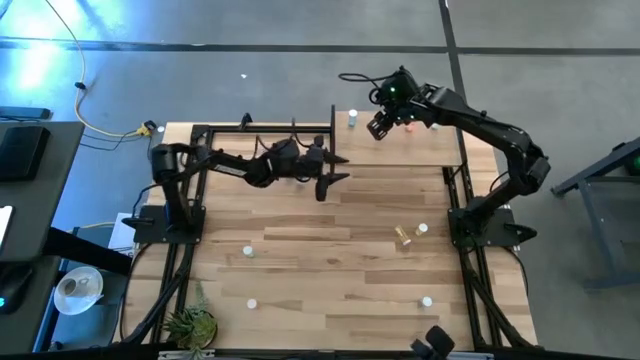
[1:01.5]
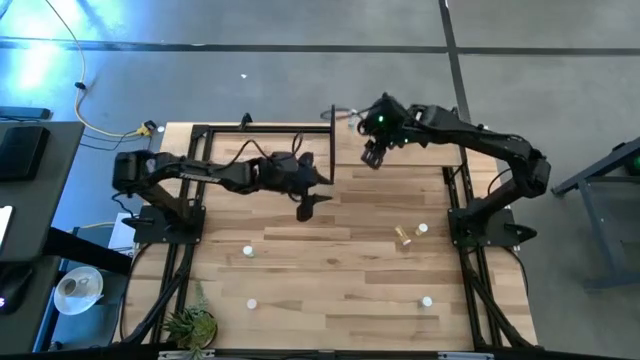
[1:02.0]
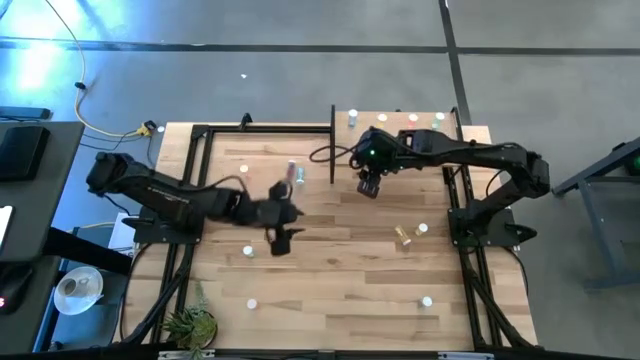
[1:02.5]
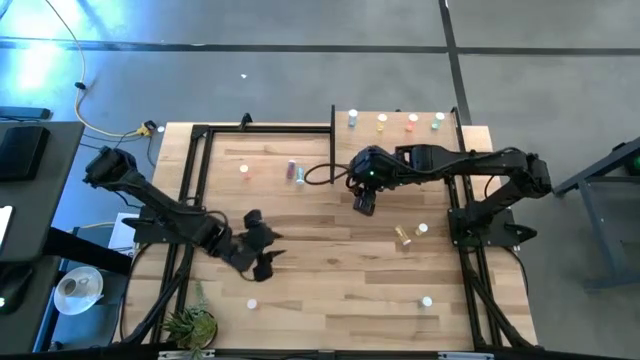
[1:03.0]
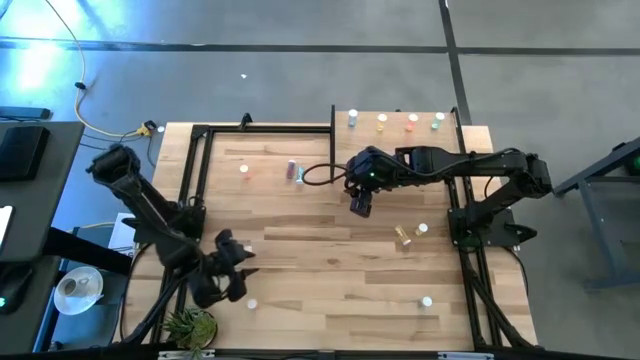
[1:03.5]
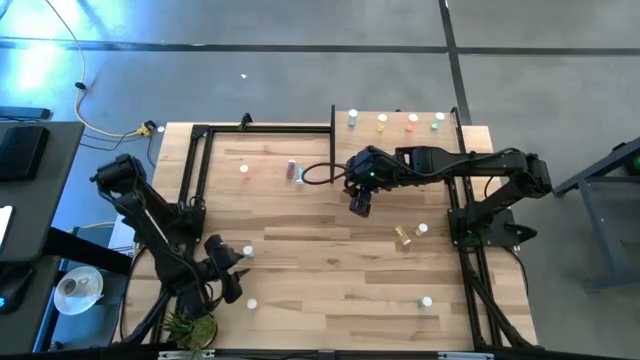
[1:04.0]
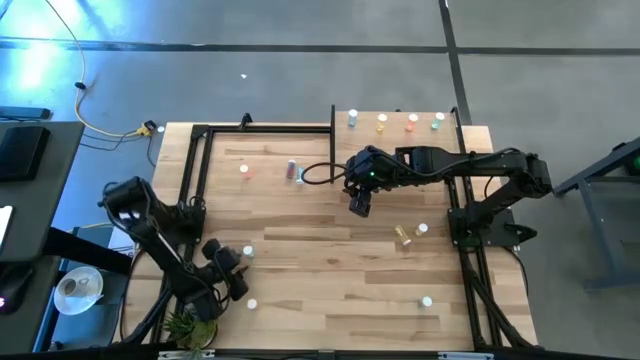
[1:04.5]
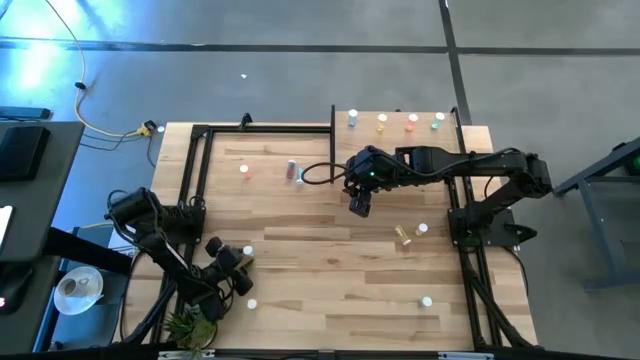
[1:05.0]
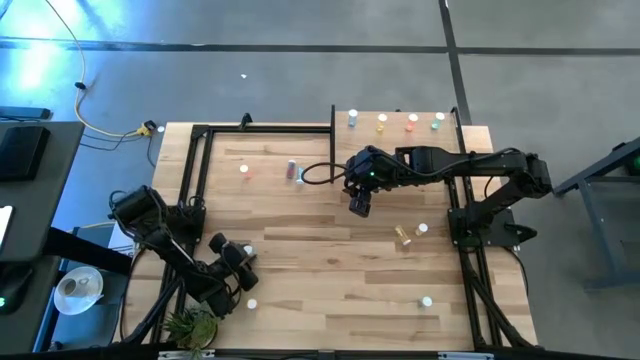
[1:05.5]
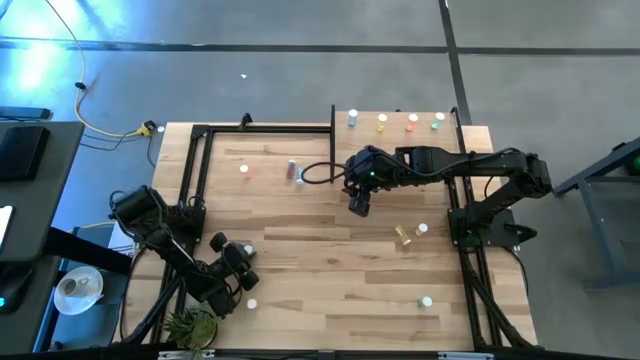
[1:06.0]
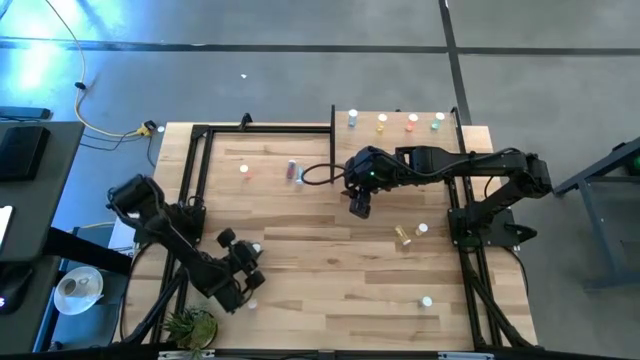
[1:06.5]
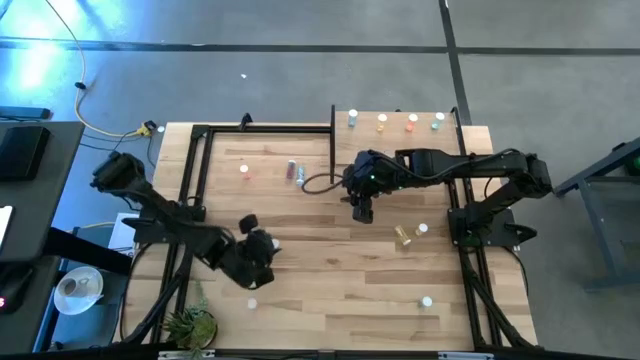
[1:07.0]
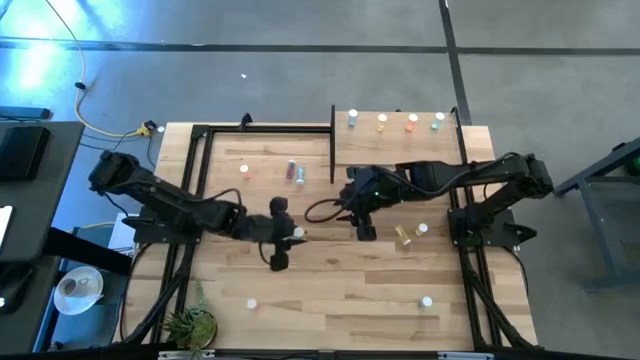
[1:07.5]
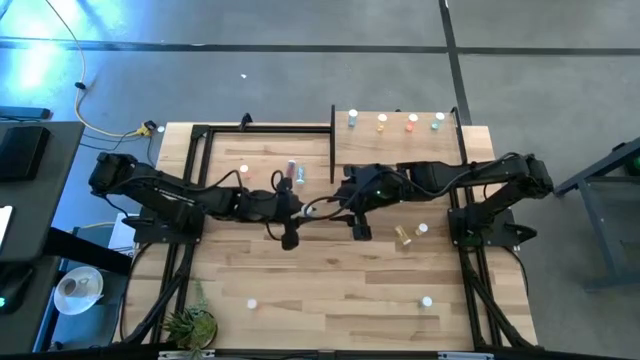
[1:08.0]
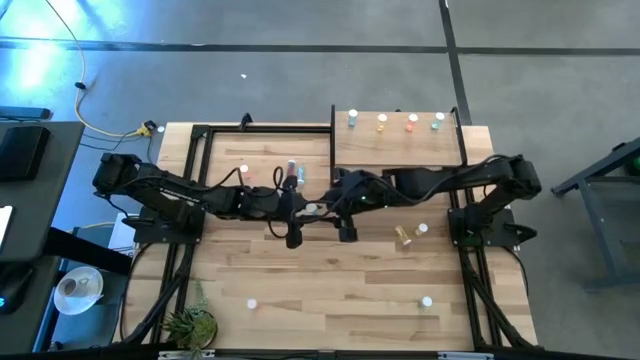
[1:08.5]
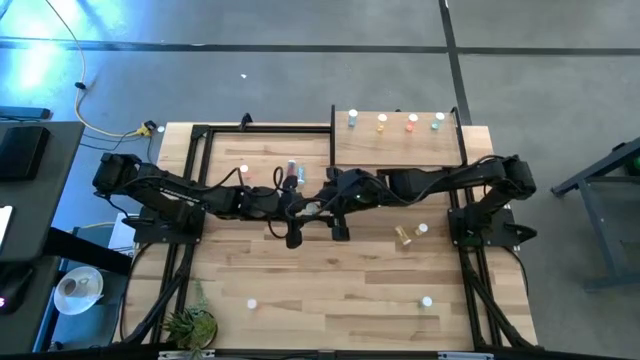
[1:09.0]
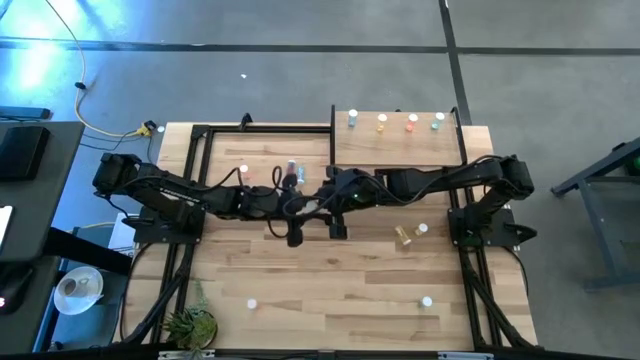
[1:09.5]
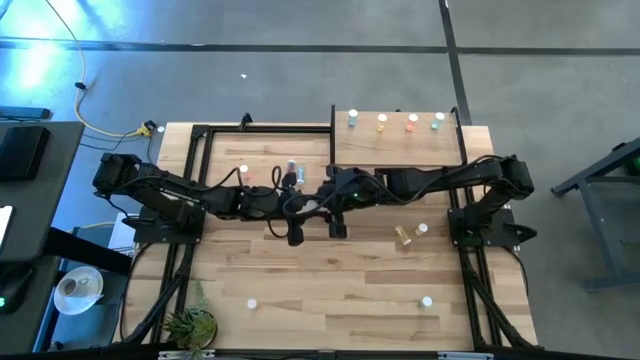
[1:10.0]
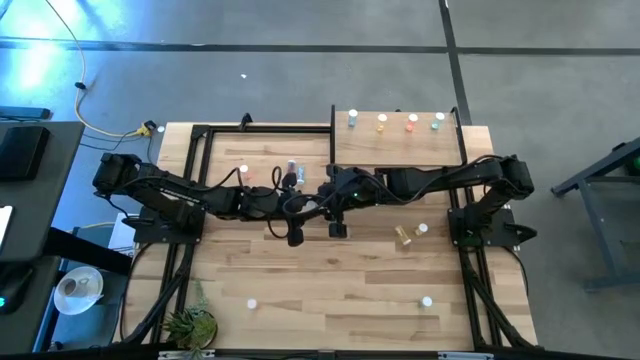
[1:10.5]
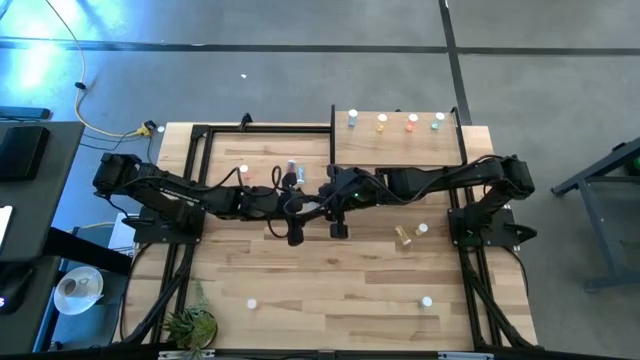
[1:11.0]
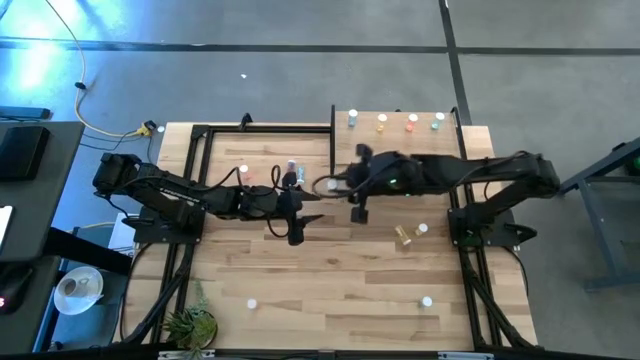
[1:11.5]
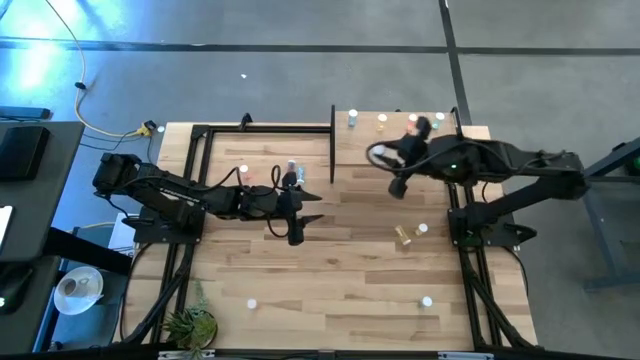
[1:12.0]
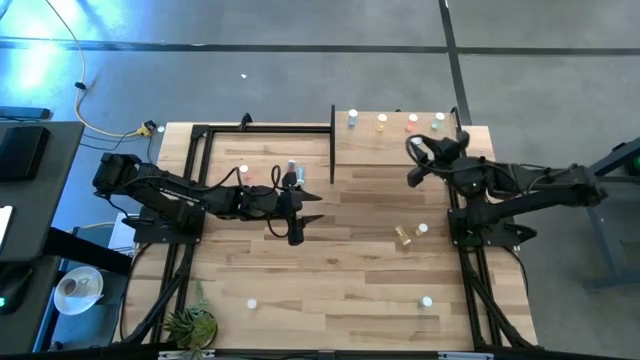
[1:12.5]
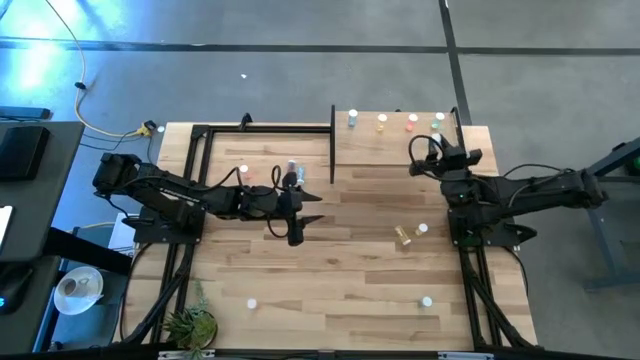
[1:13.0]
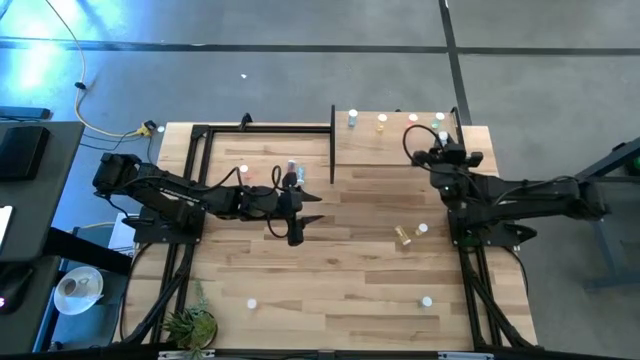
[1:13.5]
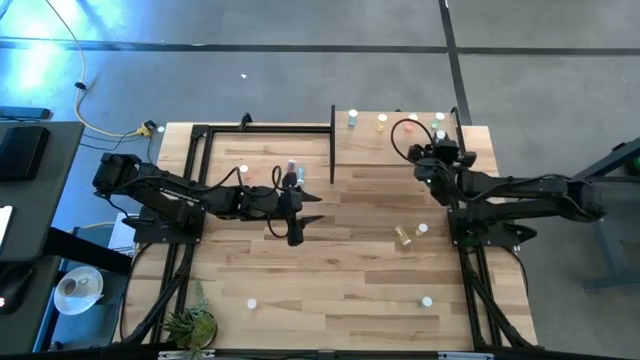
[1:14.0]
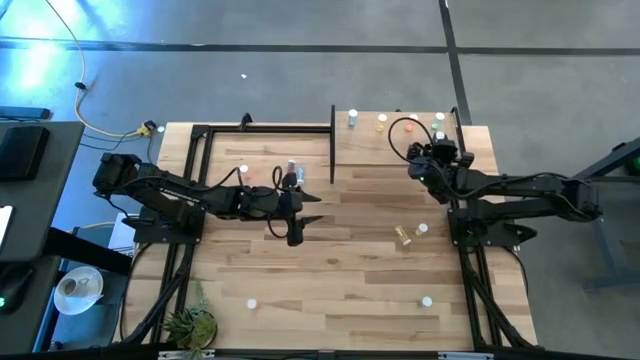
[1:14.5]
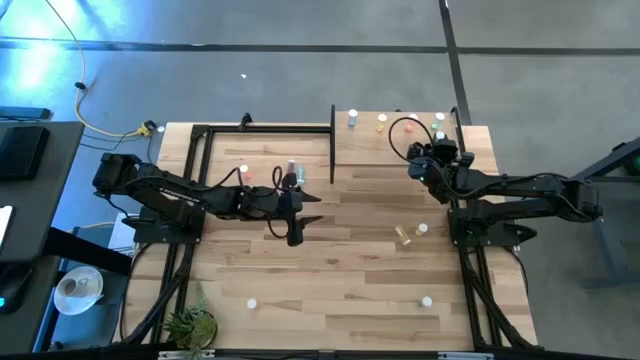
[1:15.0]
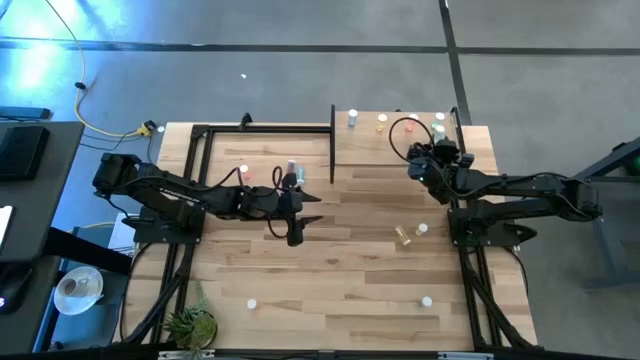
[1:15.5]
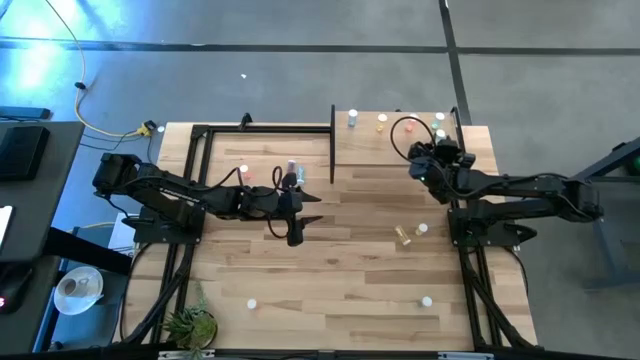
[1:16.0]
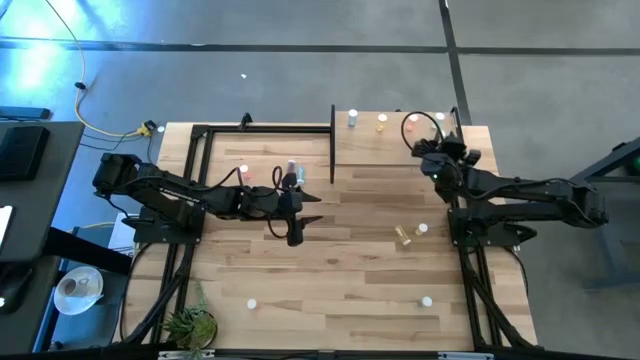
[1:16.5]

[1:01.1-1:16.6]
Task: Pick and place medicine bottles onto shelf by color
Put the left light blue medicine bottle aligned with the other light blue medicine bottle on the shelf

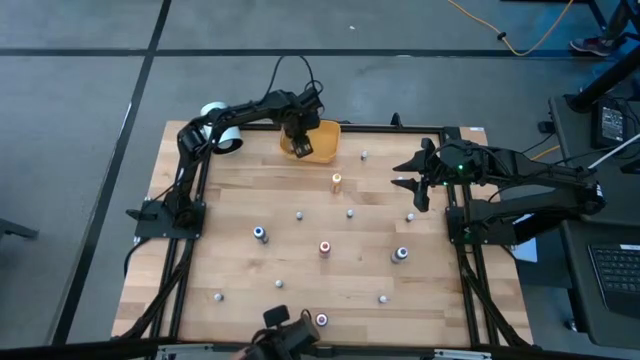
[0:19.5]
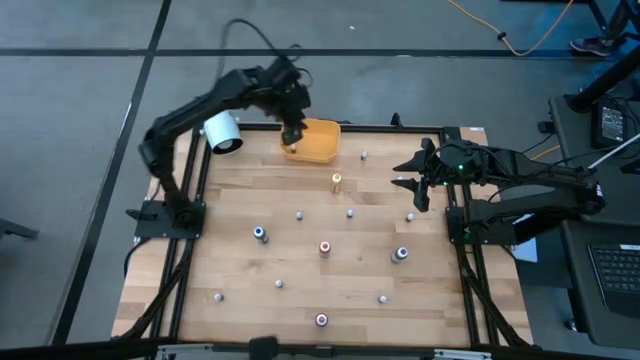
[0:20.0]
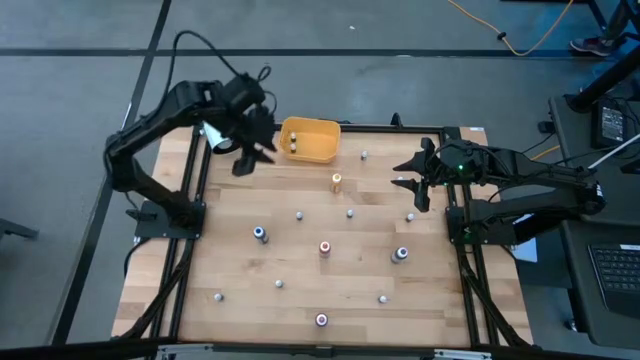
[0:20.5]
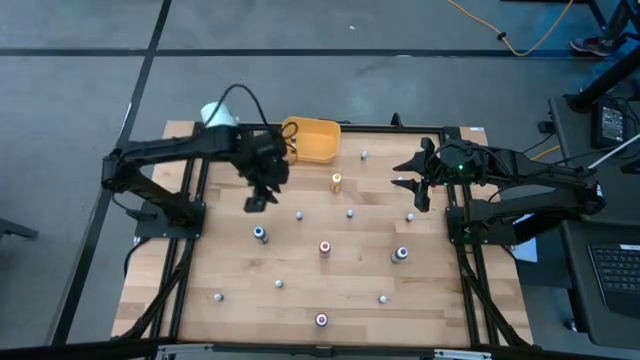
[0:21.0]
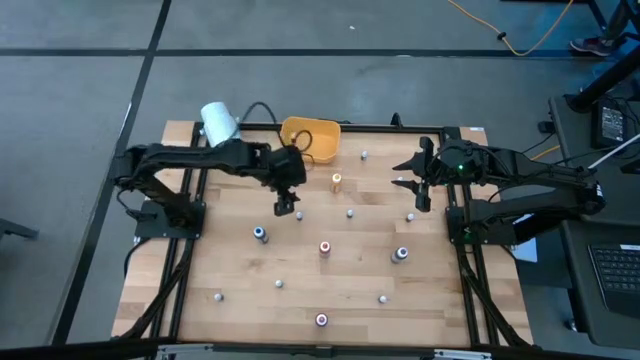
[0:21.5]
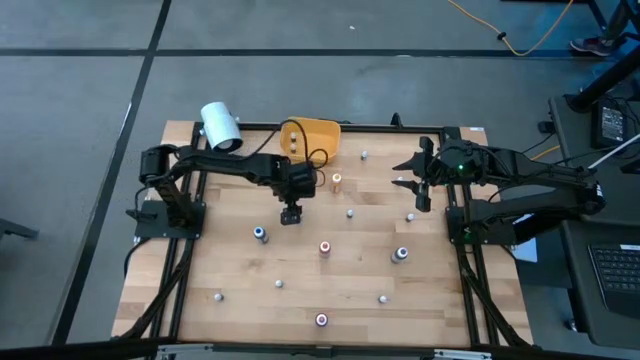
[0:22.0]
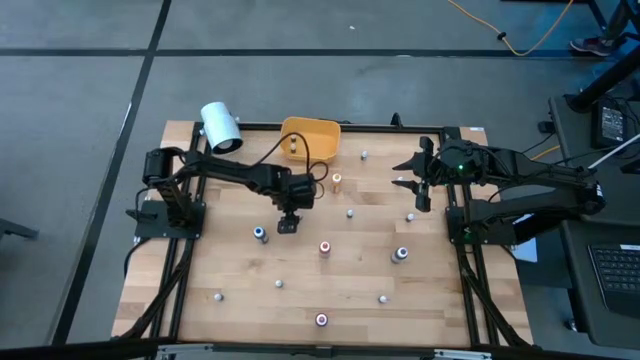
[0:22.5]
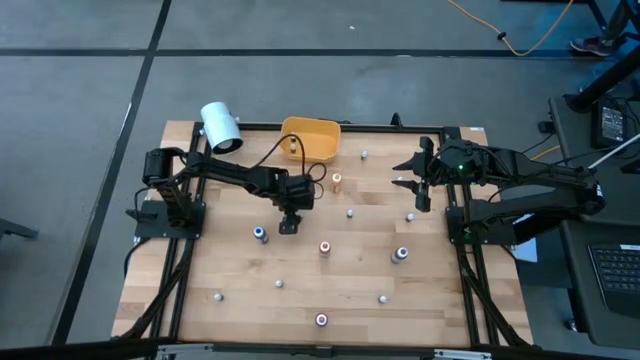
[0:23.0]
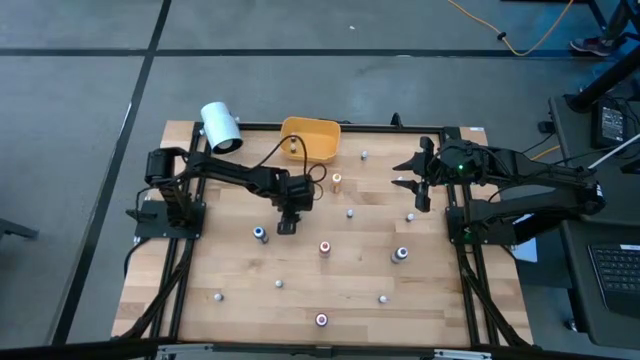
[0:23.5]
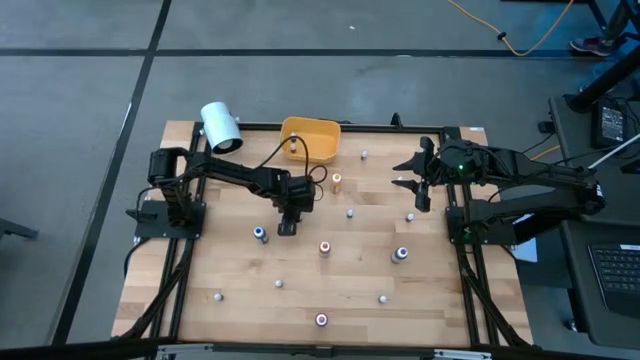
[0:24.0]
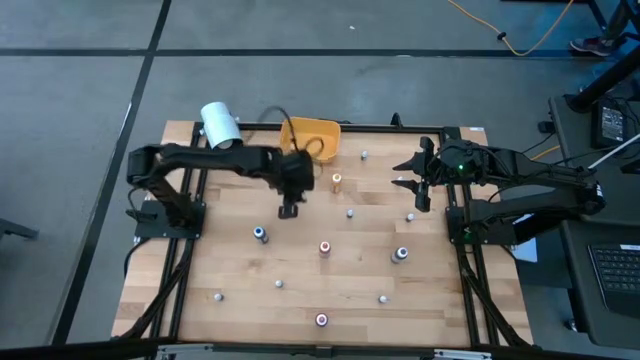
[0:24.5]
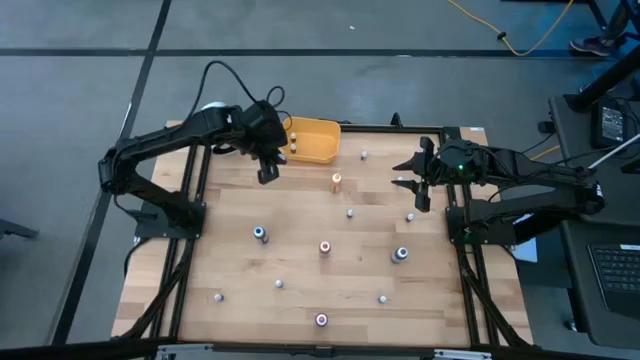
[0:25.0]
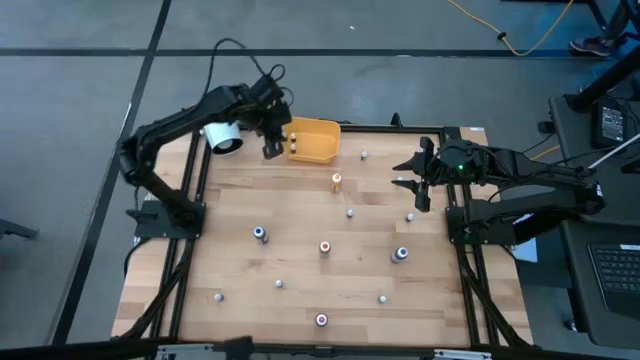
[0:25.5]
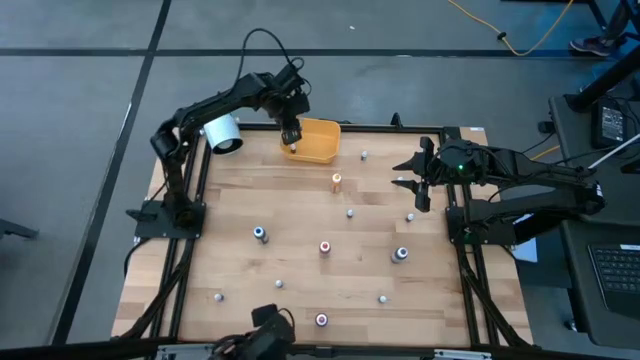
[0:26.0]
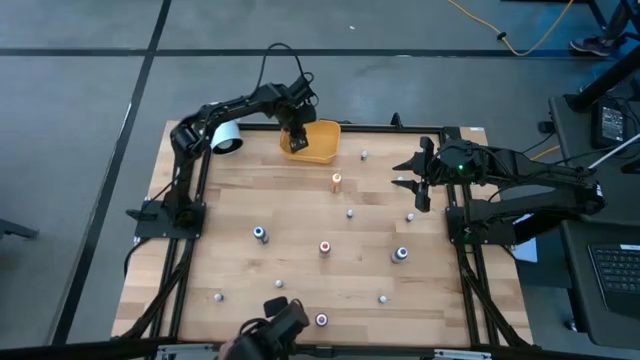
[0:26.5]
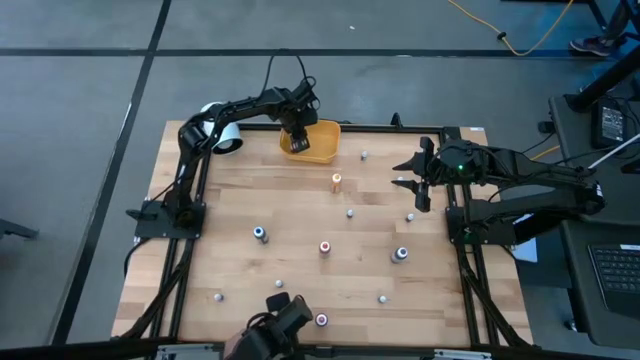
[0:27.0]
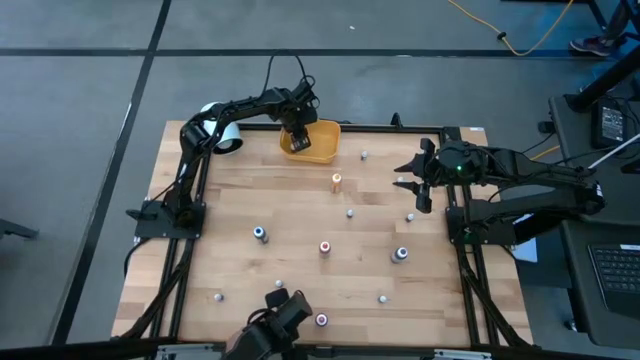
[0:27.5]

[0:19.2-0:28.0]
Task: Pick & Place food coloring
Put the bottom small blue food coloring bottle into the yellow bin
